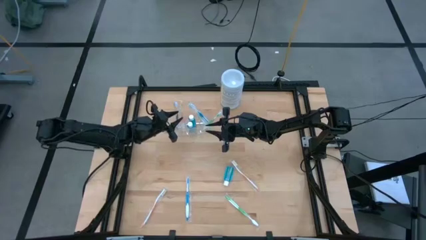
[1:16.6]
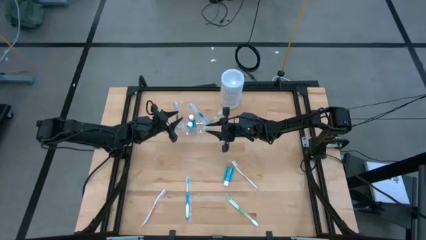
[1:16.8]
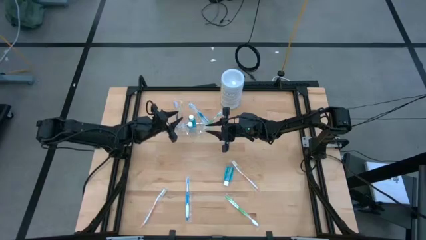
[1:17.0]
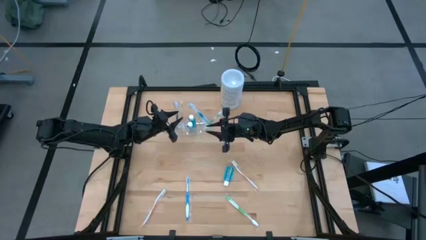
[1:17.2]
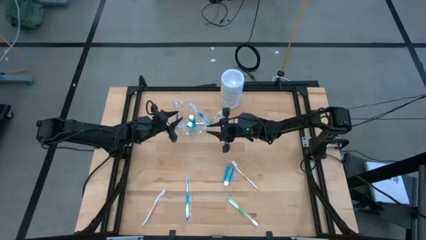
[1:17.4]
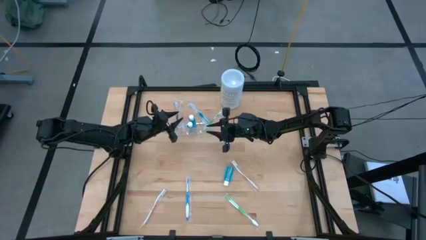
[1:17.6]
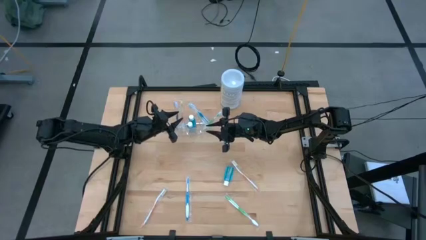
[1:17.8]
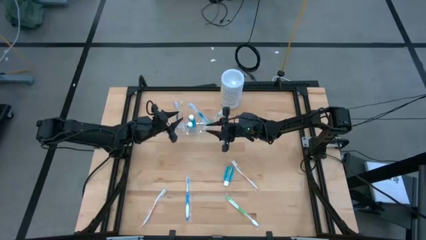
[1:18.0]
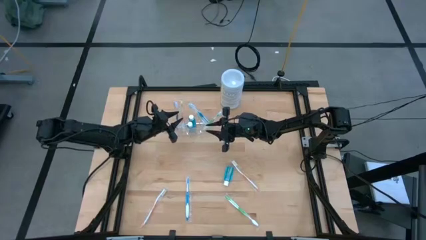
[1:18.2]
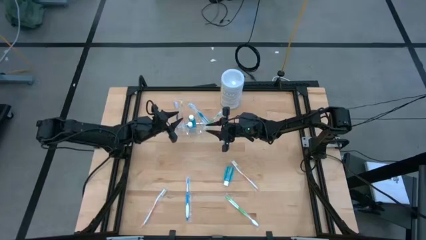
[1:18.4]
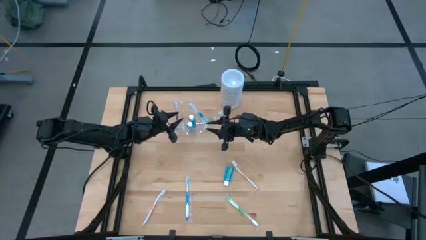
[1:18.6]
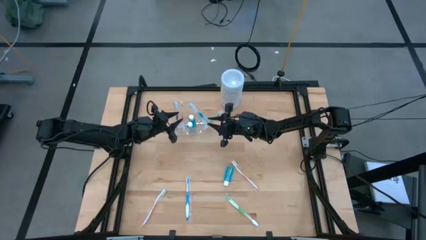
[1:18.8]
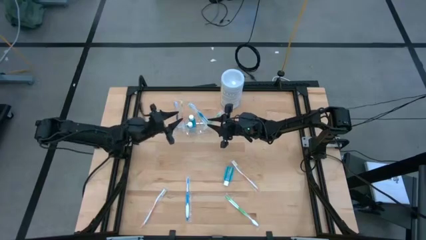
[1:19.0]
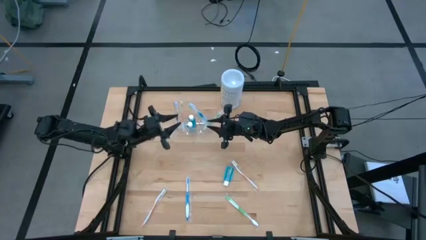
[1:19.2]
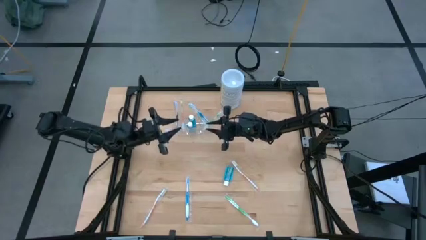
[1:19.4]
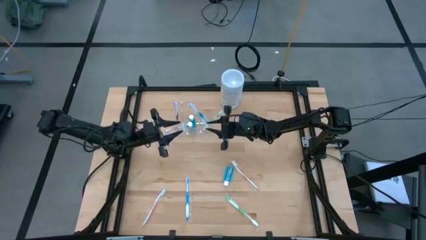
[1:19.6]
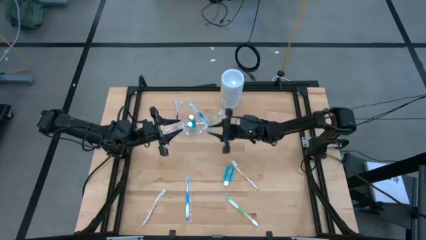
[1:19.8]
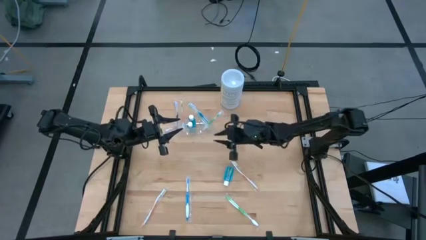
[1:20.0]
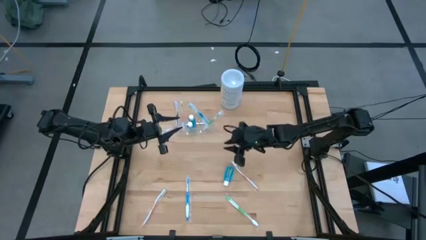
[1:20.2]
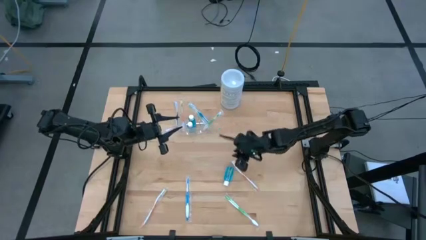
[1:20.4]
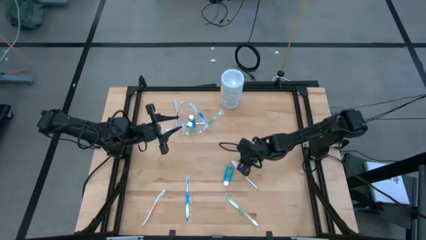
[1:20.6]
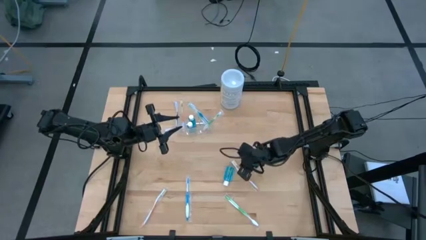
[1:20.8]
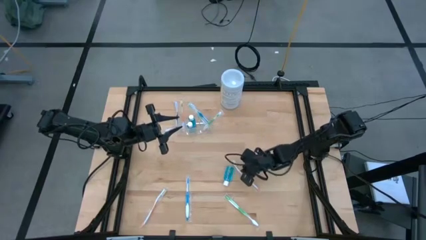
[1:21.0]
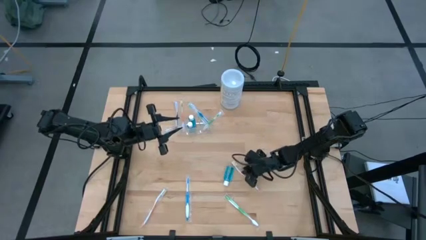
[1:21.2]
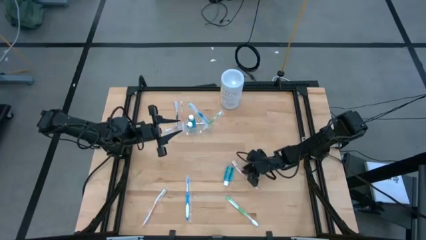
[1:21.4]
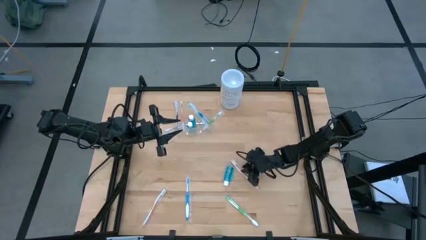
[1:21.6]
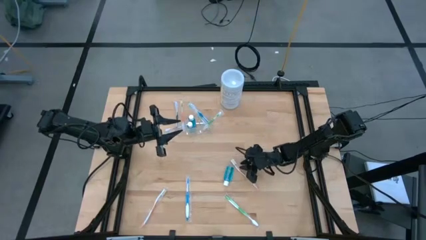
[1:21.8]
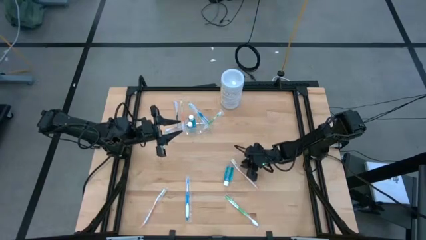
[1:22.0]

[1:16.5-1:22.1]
Task: Pick & Place toothbrushing station
Put the top orange toothbrush into the transparent organizer

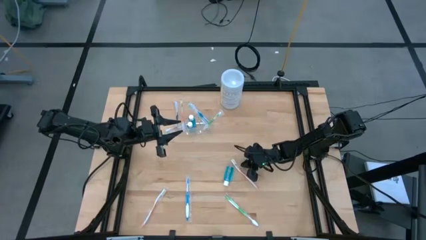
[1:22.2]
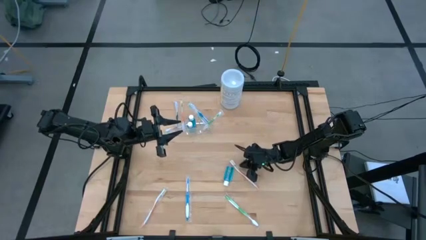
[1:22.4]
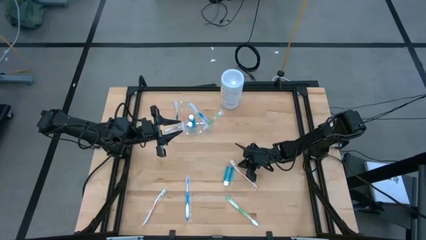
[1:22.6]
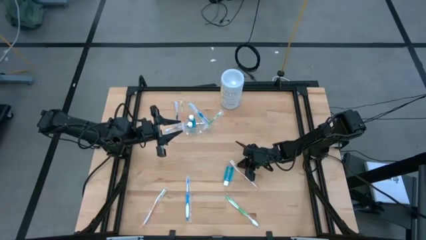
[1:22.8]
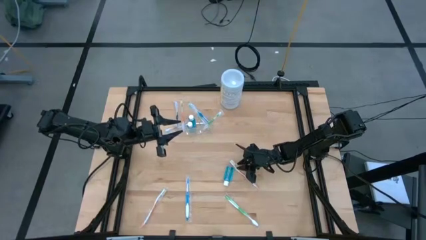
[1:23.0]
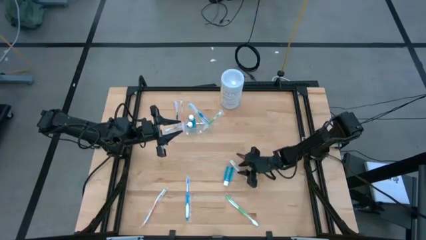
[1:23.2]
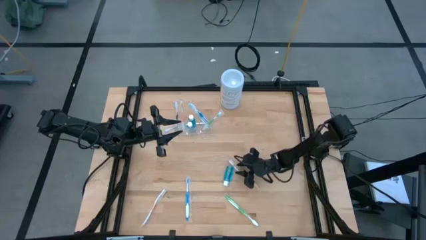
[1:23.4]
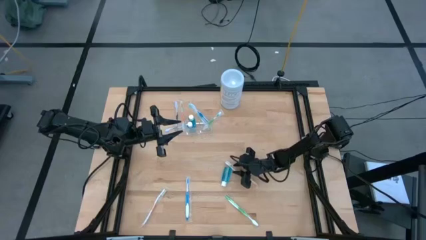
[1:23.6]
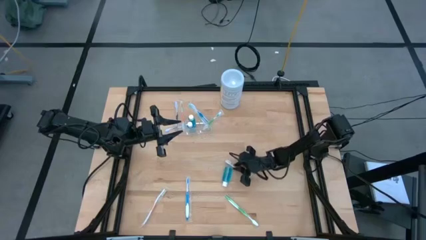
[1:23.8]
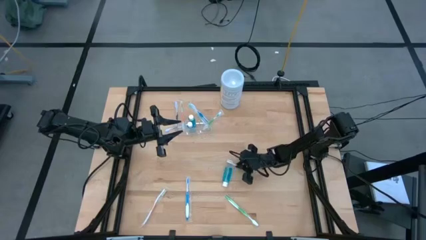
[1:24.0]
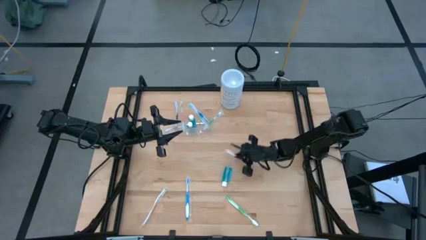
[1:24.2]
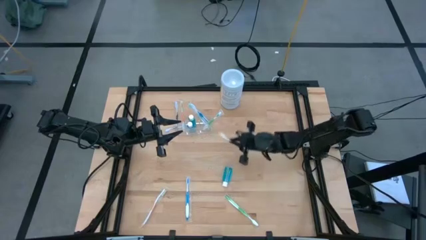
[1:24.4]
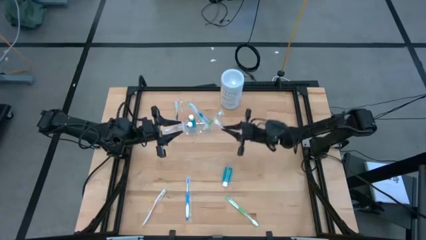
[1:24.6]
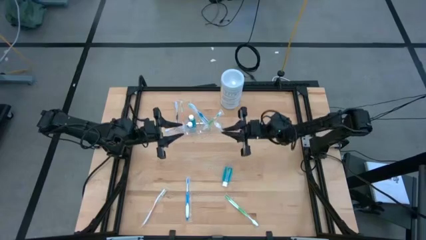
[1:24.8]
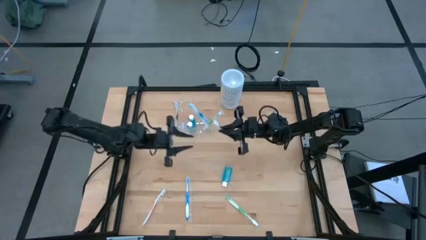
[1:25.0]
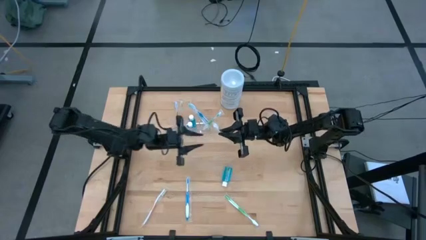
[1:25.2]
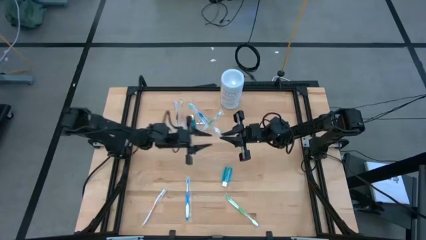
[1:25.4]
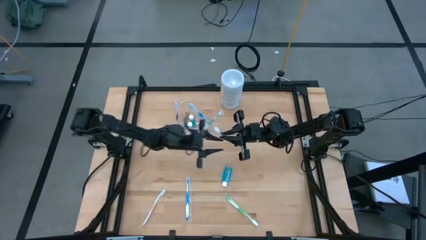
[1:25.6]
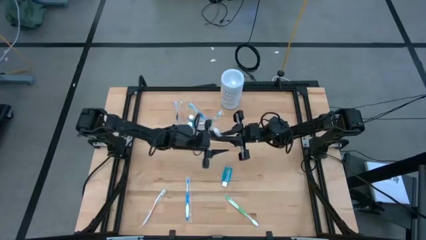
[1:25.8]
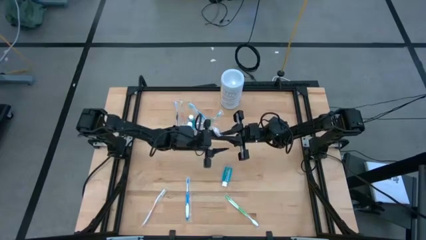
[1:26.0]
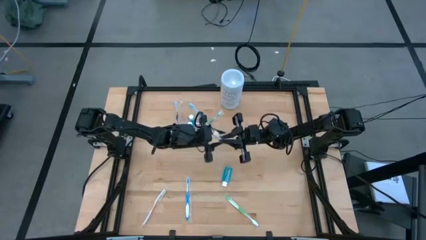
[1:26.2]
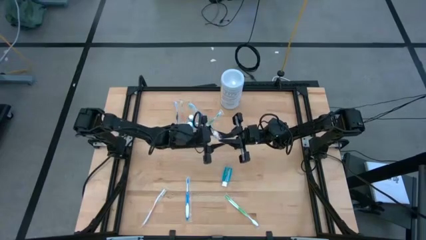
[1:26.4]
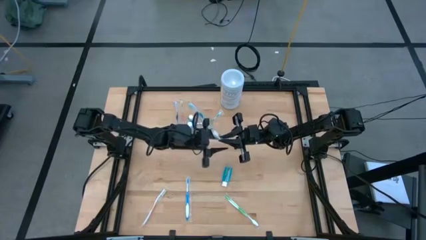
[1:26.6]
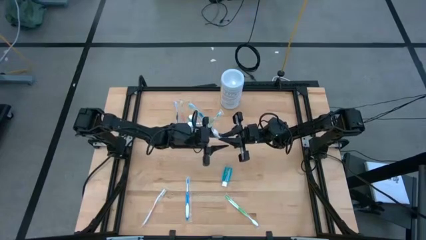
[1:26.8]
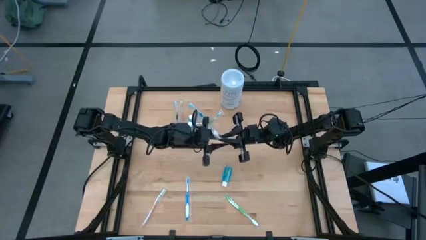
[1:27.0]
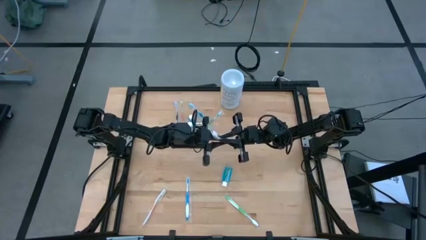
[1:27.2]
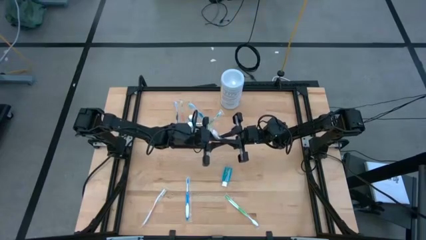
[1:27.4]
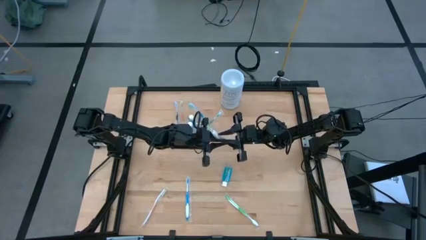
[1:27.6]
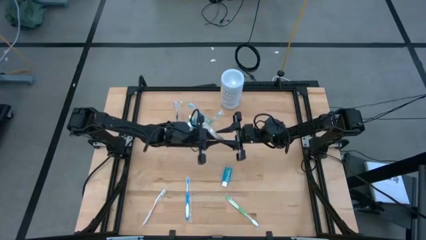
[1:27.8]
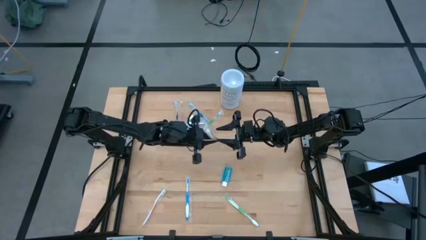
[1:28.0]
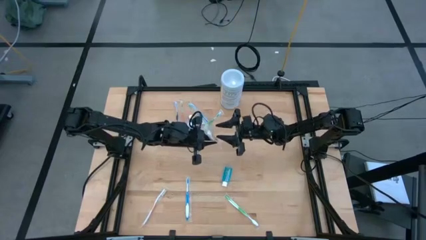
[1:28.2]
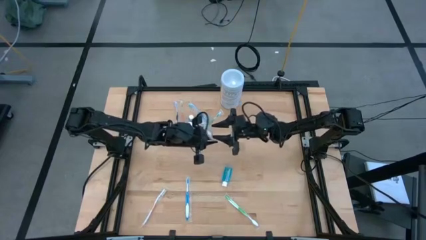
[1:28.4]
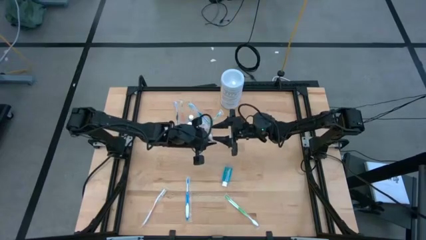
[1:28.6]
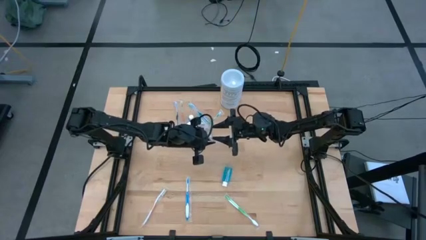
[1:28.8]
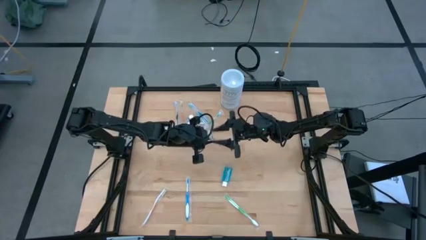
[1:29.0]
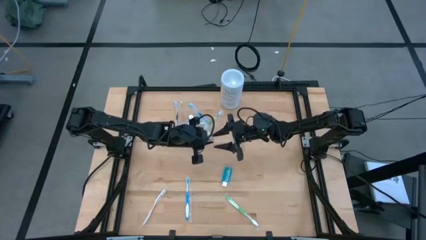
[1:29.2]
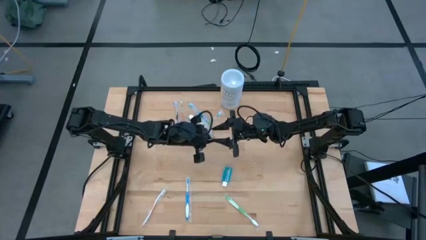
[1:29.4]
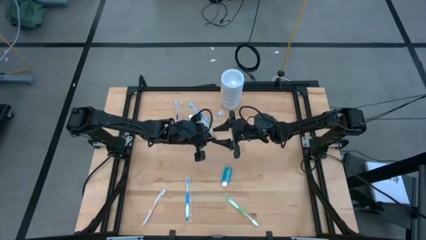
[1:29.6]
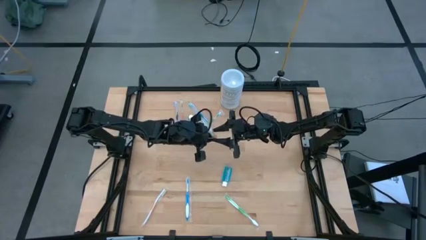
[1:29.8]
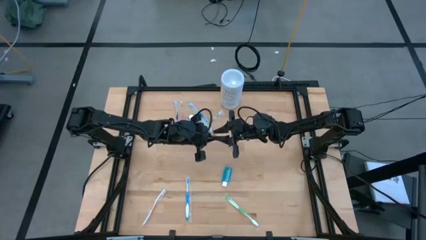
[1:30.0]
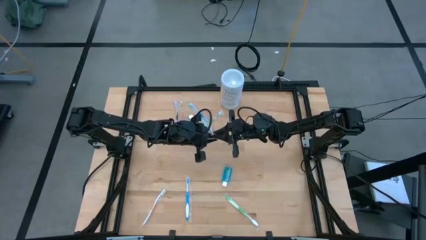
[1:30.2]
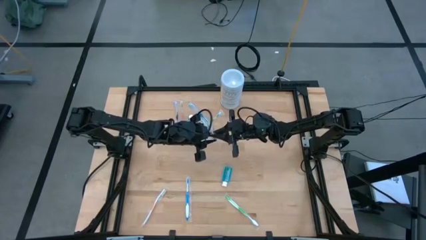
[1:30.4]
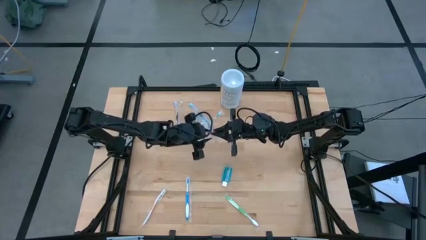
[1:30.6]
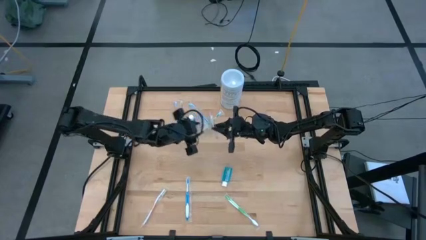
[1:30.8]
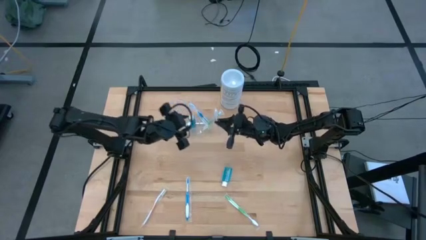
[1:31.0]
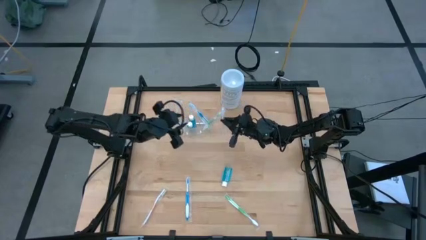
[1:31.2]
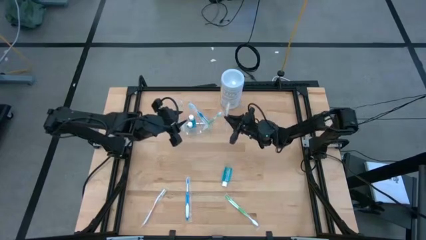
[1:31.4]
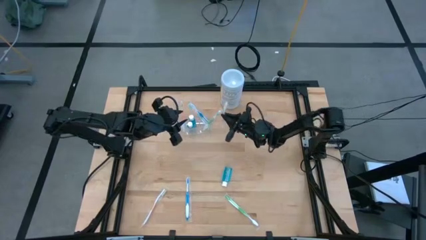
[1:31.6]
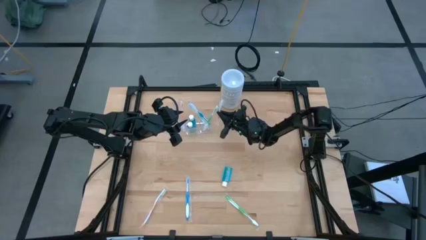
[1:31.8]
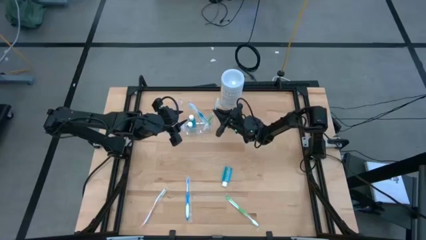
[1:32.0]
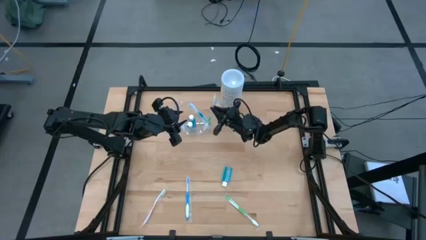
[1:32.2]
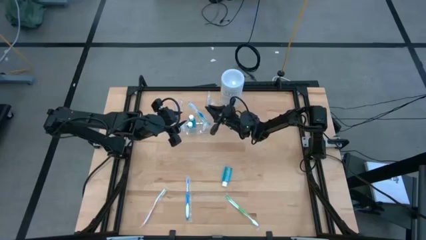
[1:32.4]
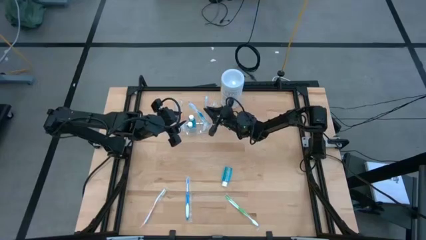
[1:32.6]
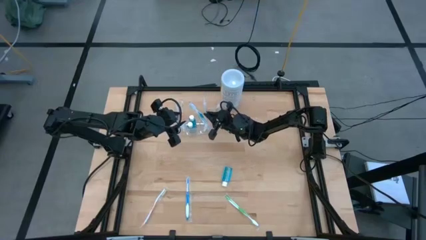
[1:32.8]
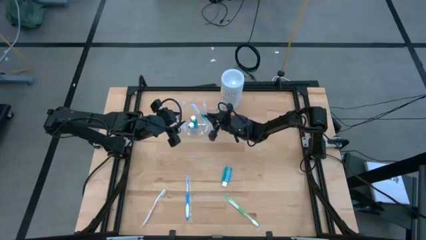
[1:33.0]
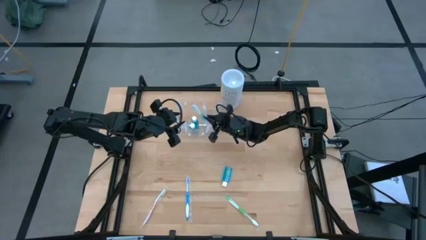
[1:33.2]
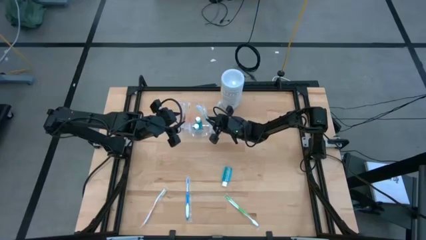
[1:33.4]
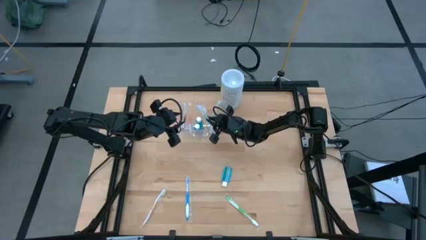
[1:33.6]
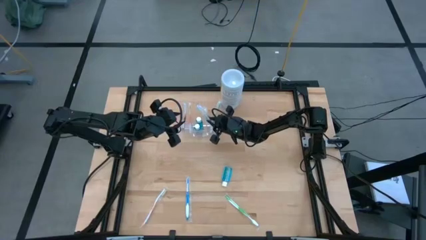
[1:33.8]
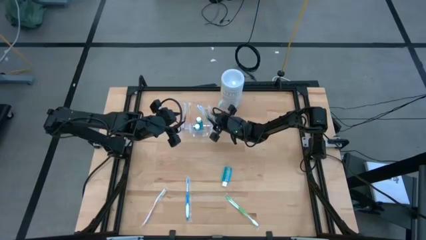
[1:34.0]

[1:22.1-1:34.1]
Put the top orange toothbrush into the transparent organizer
